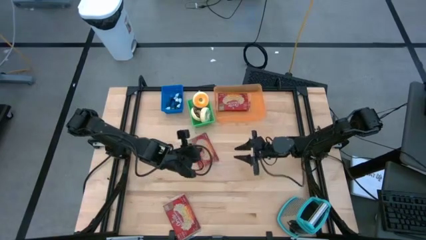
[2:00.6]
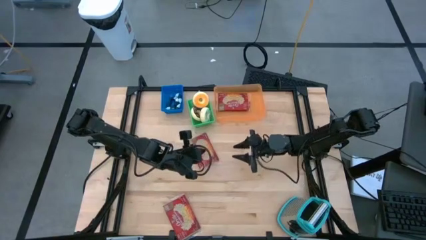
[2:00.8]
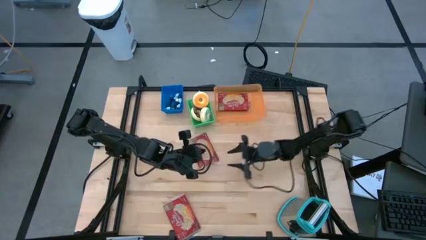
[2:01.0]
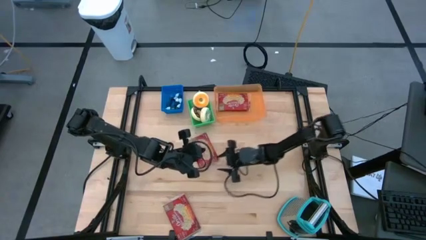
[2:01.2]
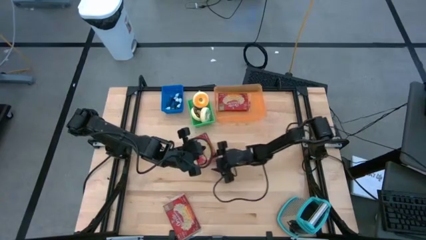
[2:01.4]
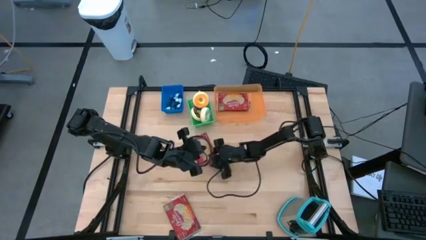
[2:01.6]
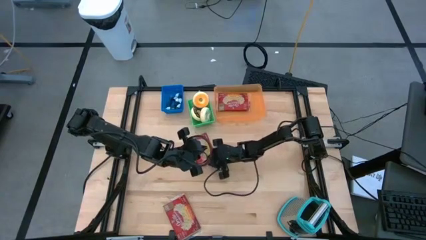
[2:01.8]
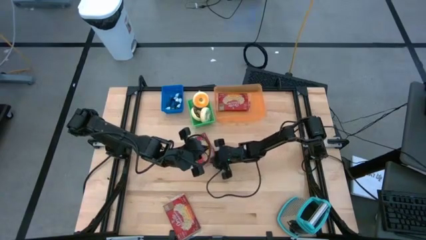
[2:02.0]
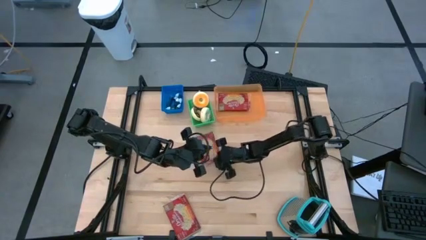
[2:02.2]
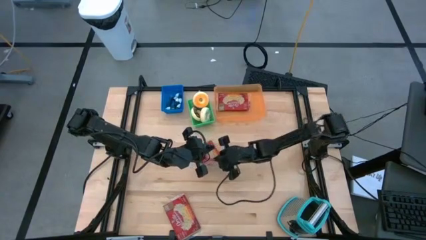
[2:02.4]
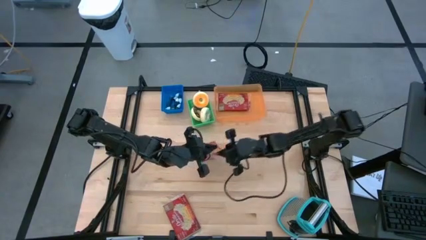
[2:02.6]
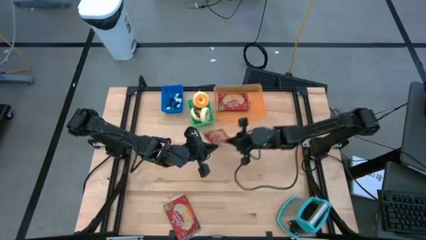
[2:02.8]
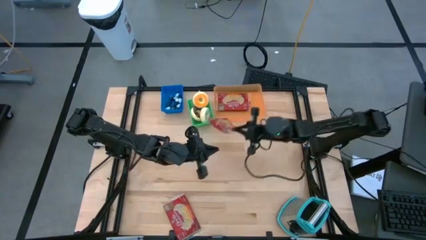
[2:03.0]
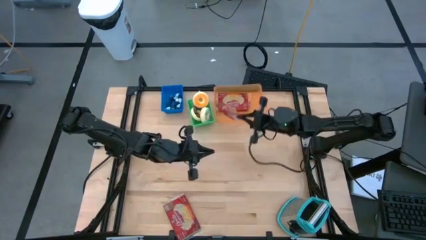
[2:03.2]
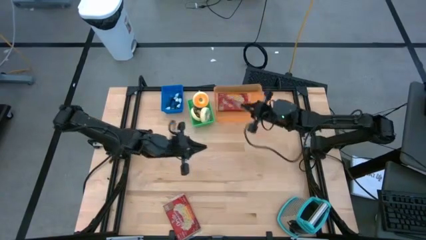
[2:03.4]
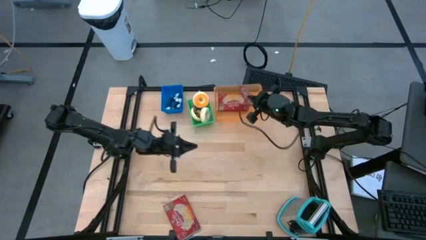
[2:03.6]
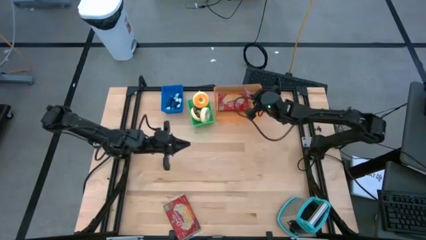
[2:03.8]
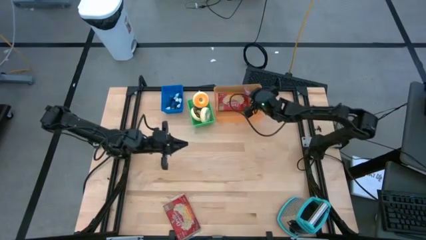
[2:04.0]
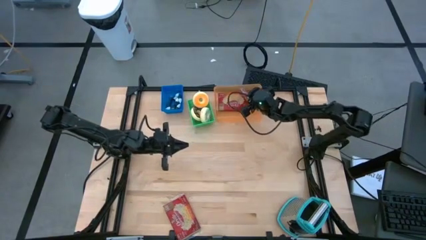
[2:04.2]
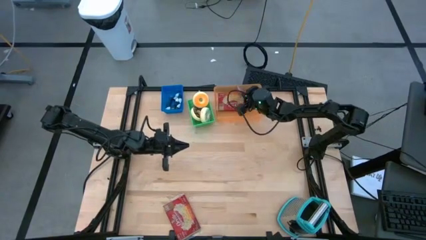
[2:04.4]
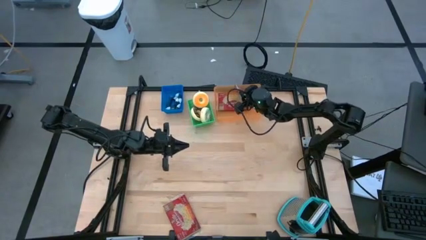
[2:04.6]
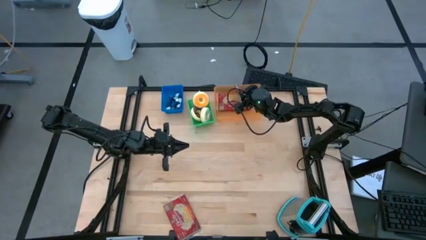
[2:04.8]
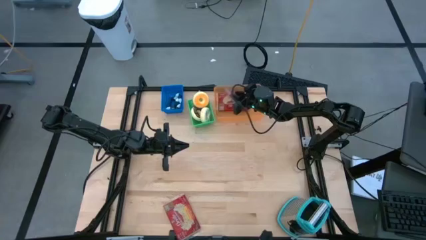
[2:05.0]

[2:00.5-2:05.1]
Put the top red popcorn bag into the orange bin

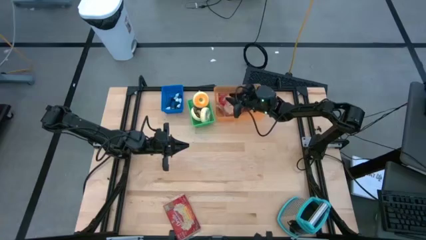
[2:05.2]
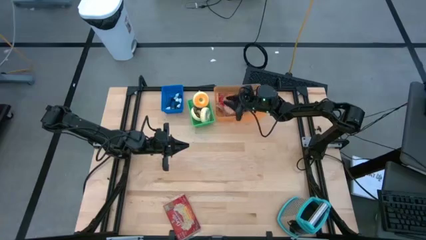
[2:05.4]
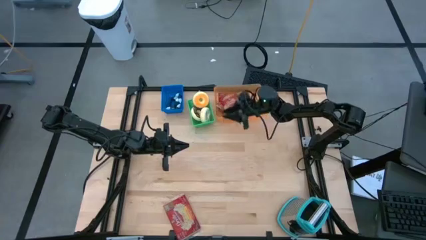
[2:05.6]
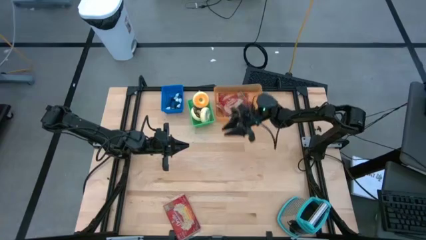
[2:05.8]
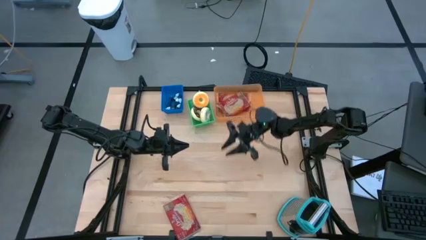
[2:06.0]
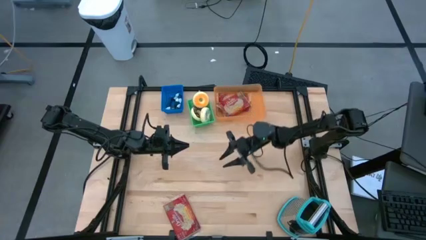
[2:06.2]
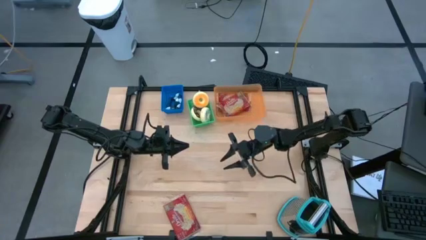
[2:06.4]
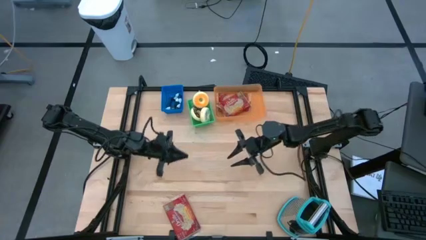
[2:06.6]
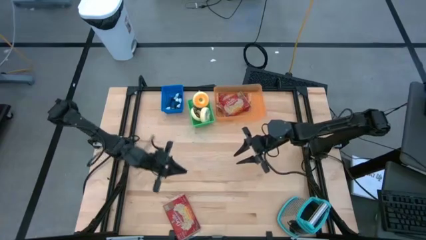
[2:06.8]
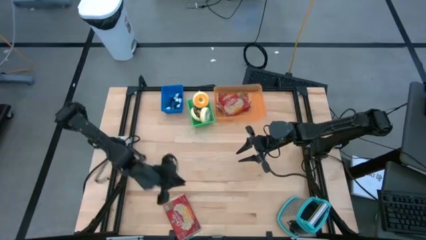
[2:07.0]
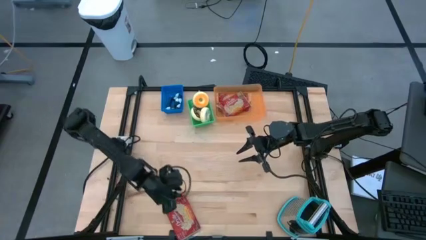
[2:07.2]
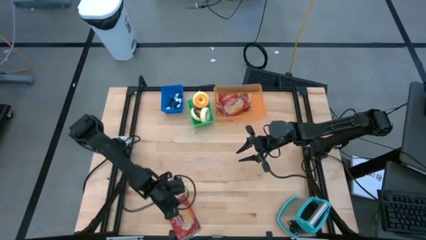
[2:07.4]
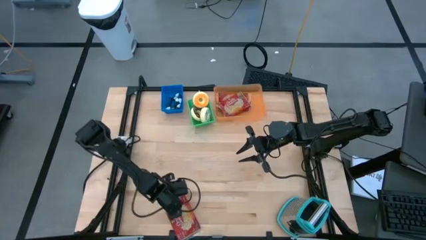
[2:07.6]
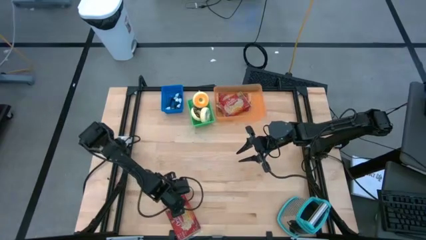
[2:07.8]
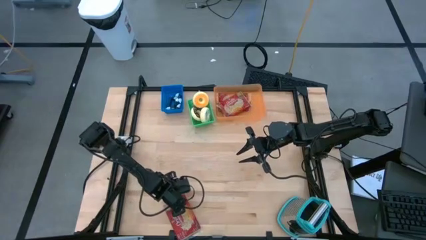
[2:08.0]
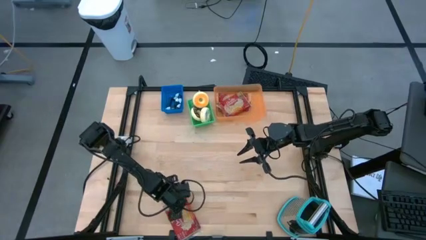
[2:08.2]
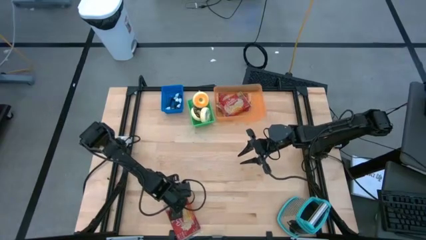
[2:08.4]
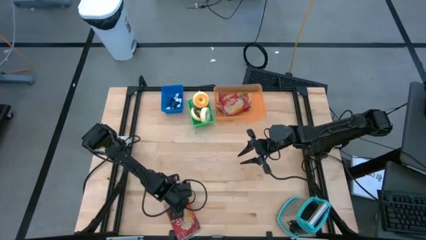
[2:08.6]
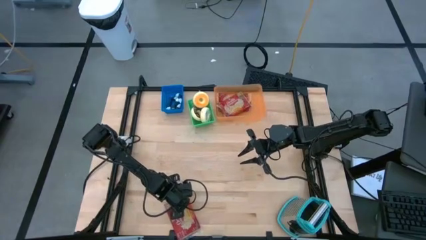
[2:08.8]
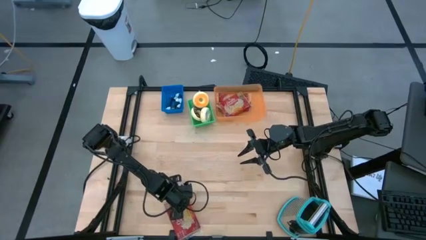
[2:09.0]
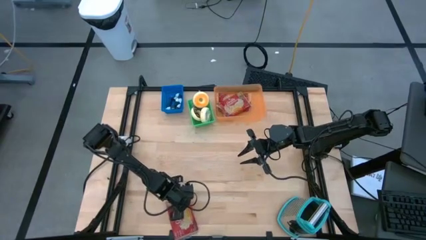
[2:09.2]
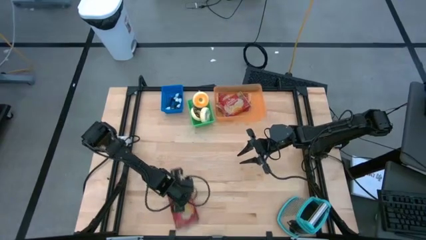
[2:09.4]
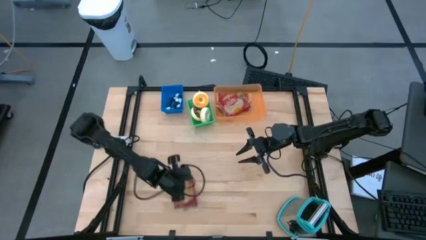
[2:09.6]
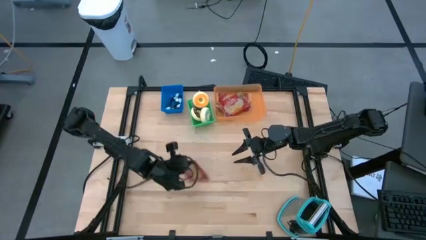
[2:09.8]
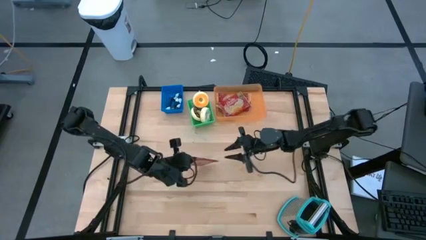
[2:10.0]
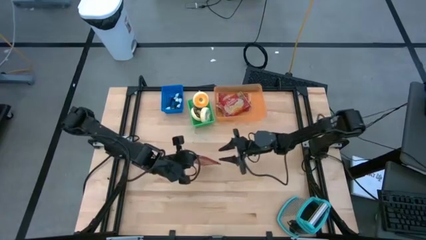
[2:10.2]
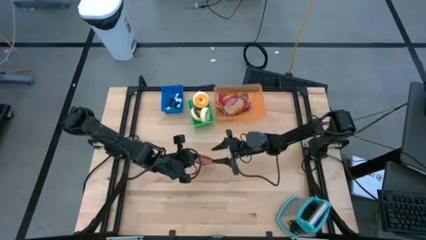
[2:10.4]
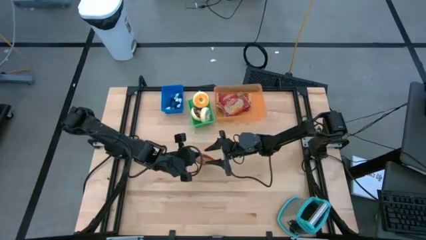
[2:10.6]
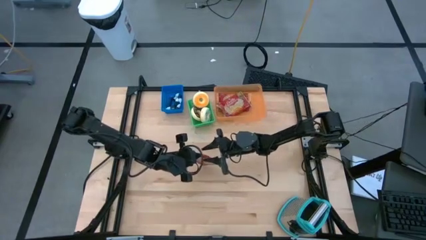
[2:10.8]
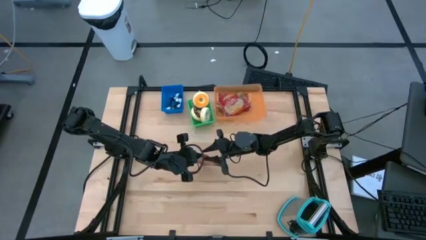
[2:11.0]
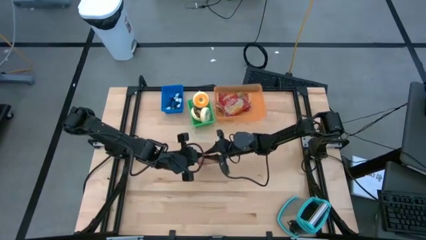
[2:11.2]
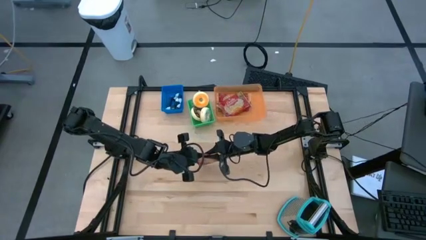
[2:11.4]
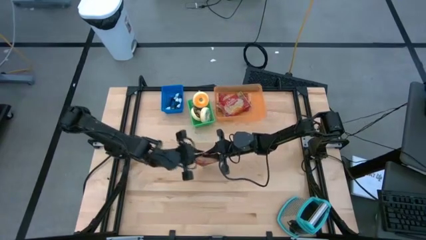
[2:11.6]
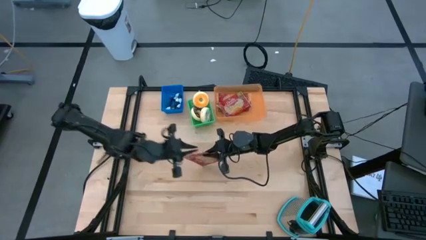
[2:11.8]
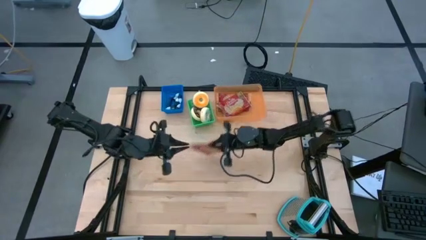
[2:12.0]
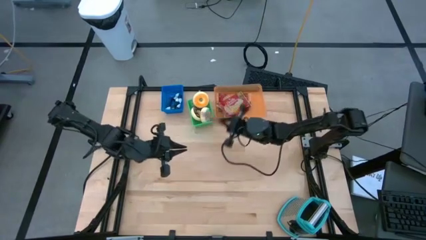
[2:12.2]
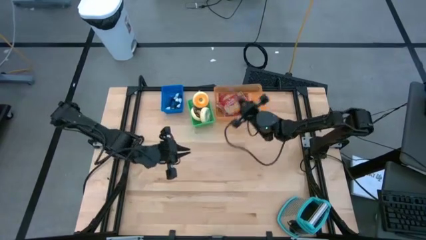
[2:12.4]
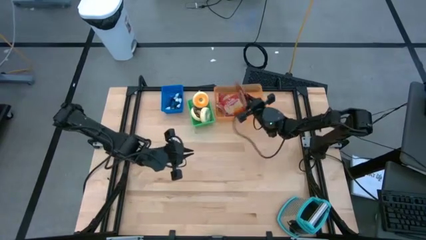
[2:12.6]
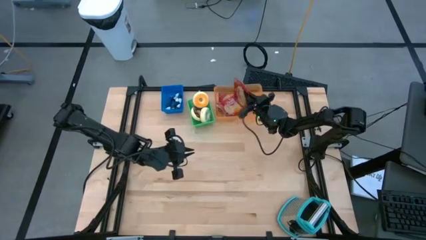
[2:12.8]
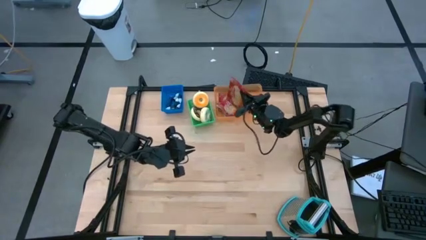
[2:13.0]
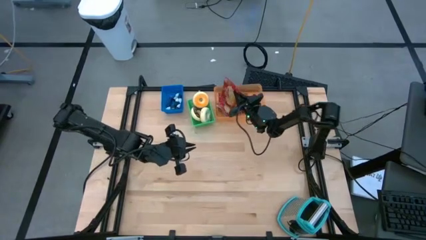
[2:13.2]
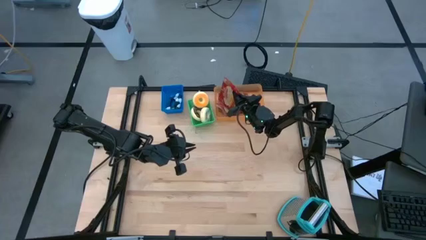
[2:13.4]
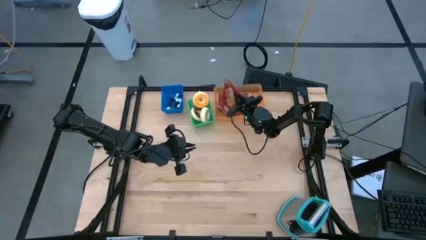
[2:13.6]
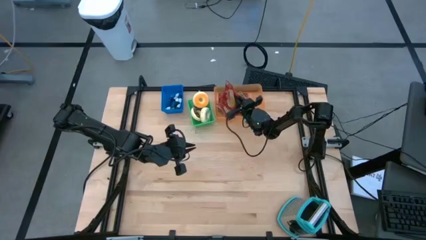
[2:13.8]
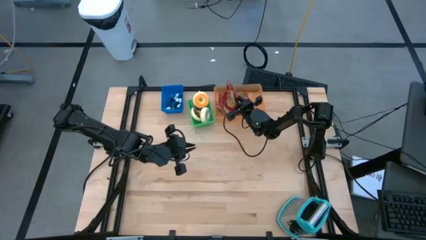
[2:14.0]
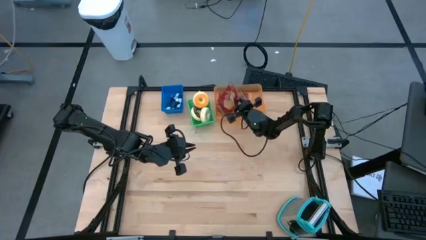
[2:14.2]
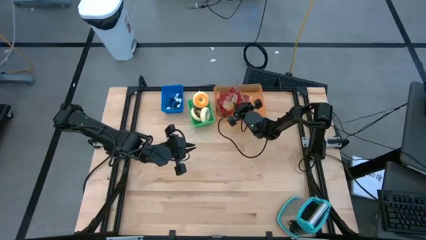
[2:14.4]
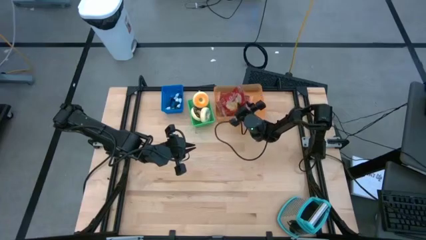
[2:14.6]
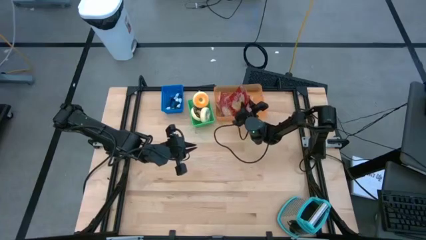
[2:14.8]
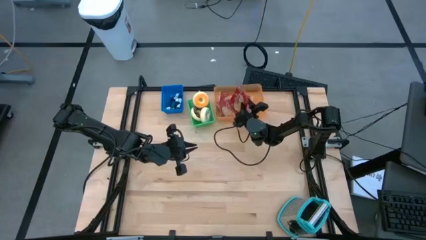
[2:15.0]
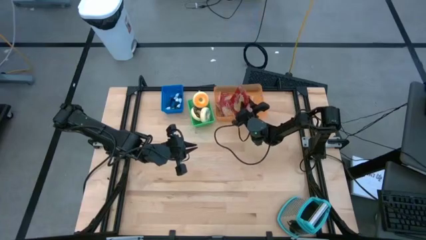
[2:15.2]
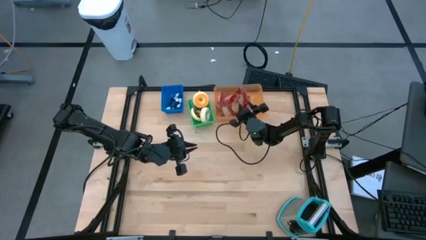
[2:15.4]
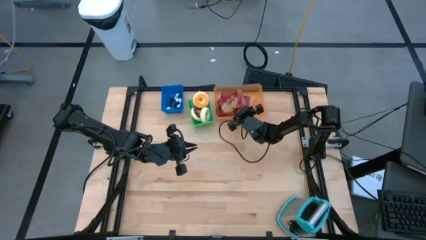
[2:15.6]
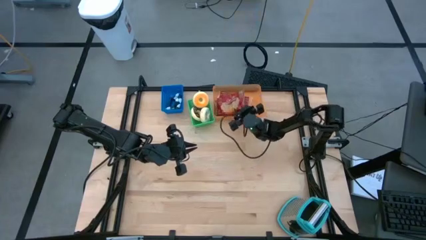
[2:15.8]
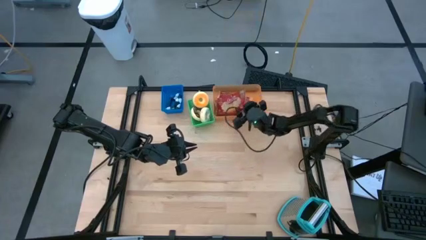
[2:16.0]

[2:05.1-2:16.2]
Put the red popcorn bag into the orange bin
